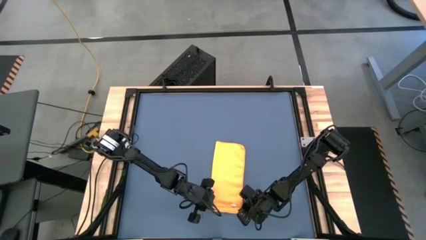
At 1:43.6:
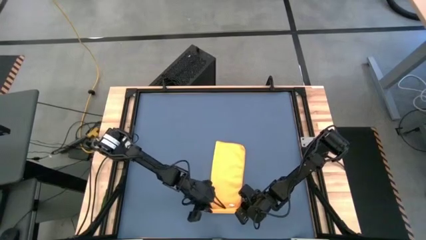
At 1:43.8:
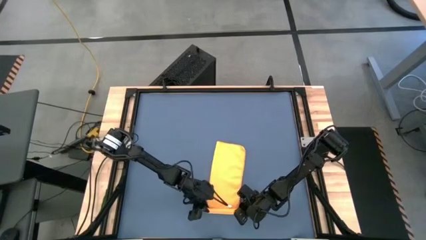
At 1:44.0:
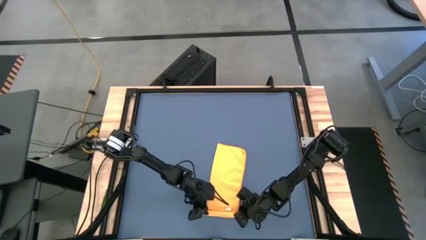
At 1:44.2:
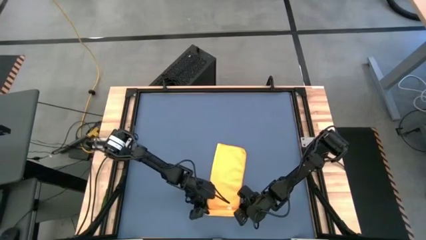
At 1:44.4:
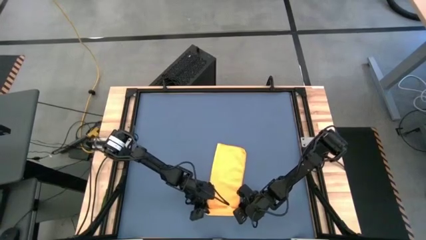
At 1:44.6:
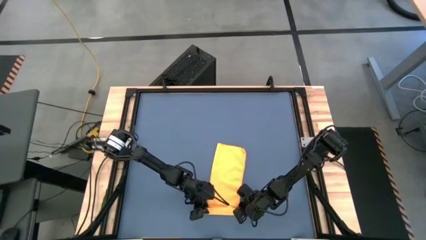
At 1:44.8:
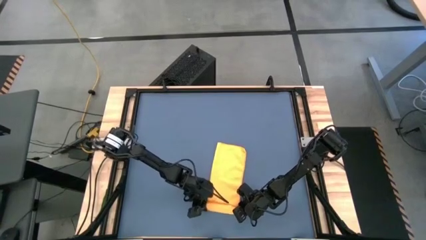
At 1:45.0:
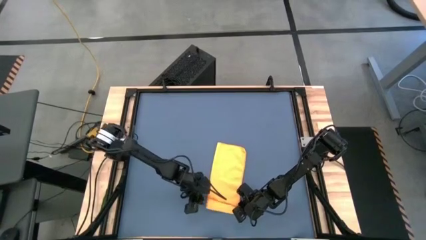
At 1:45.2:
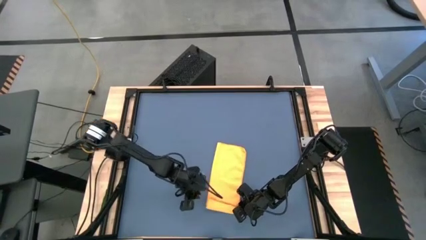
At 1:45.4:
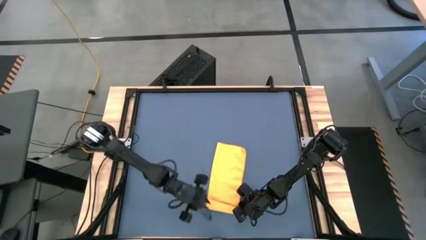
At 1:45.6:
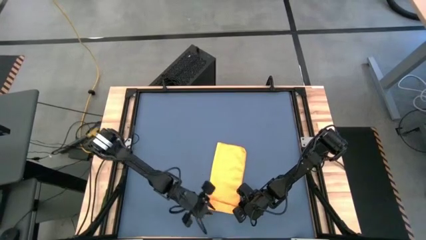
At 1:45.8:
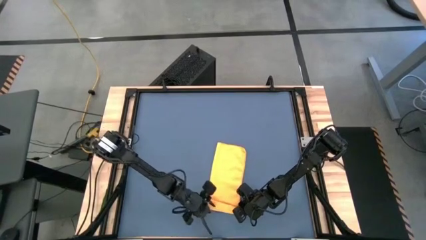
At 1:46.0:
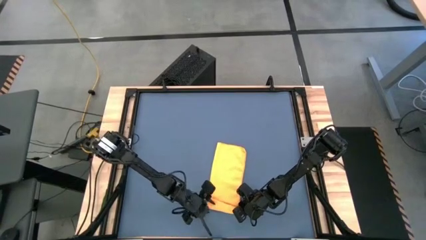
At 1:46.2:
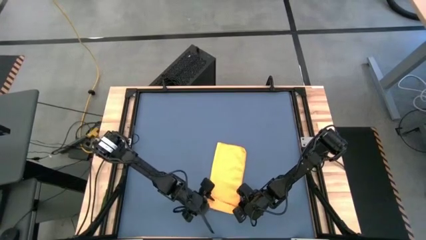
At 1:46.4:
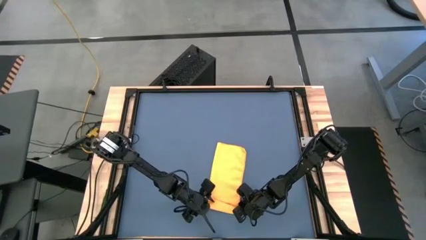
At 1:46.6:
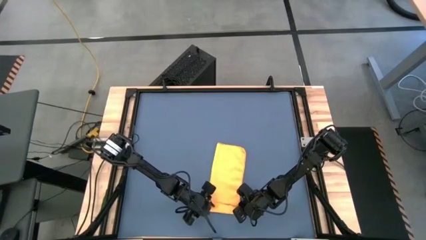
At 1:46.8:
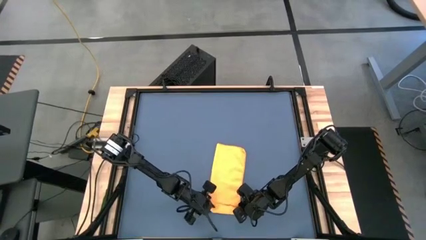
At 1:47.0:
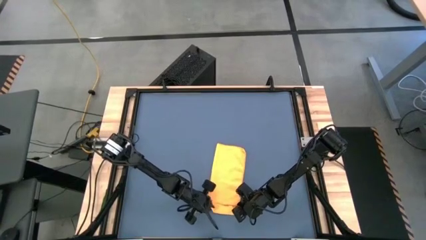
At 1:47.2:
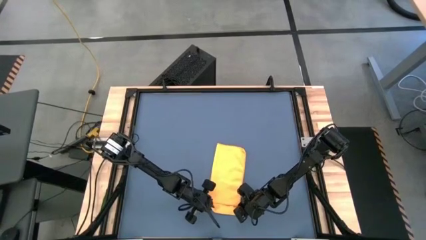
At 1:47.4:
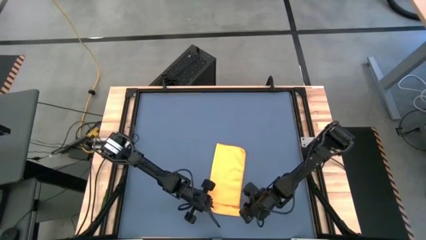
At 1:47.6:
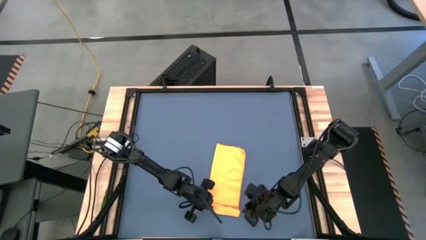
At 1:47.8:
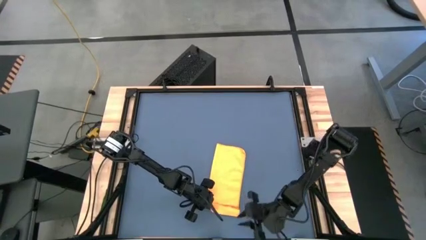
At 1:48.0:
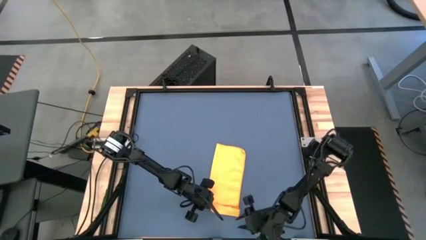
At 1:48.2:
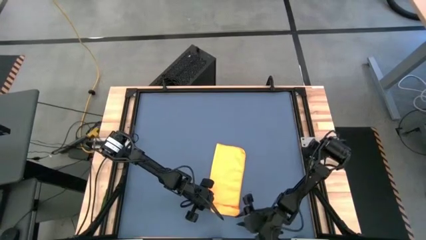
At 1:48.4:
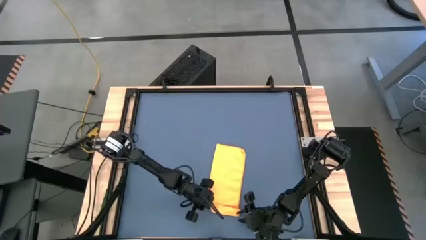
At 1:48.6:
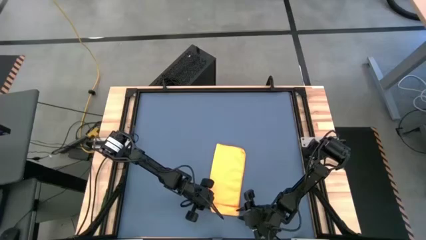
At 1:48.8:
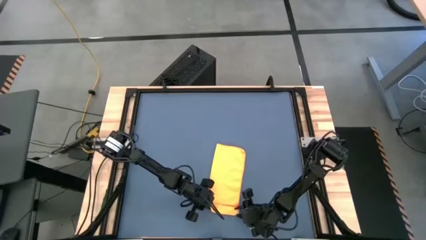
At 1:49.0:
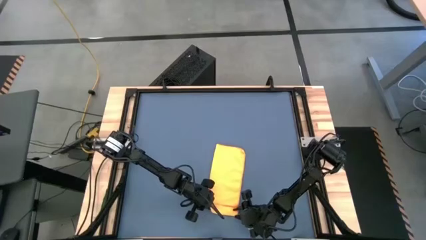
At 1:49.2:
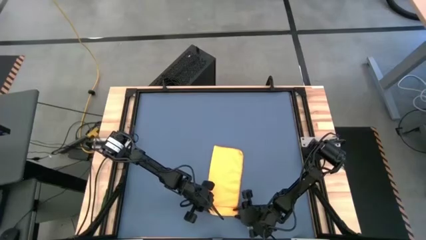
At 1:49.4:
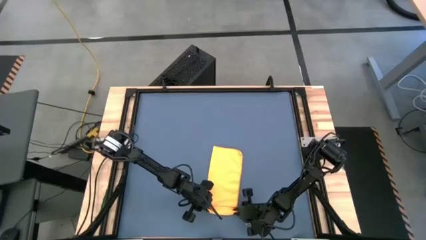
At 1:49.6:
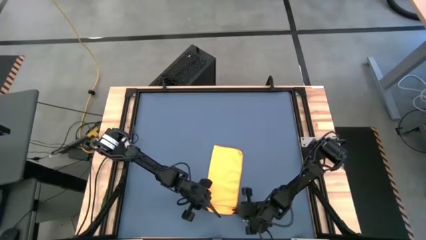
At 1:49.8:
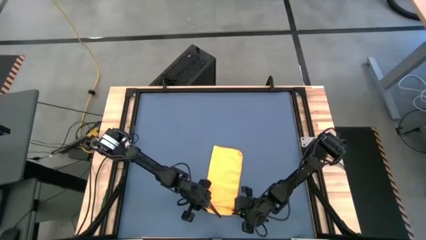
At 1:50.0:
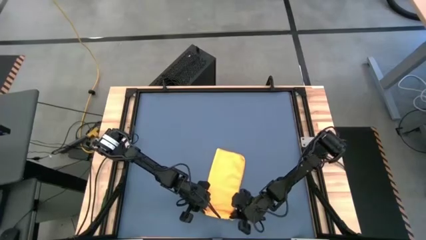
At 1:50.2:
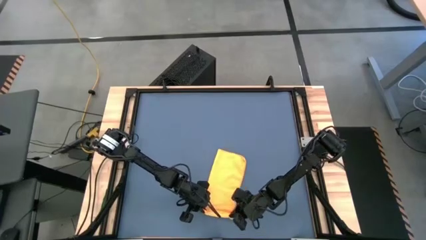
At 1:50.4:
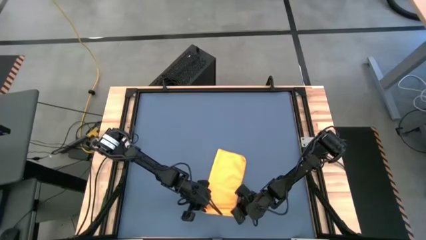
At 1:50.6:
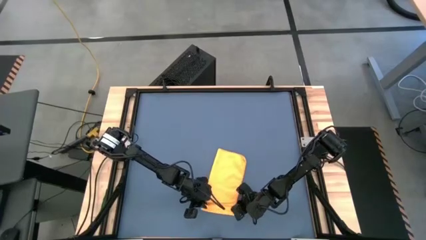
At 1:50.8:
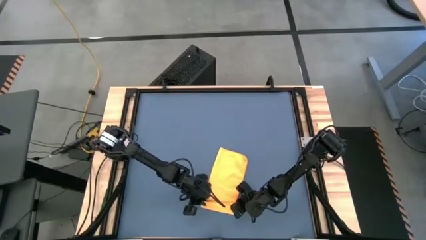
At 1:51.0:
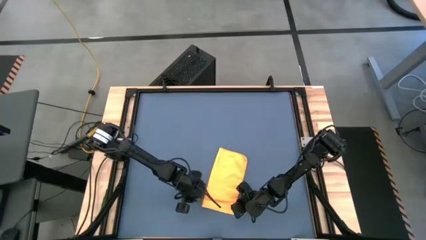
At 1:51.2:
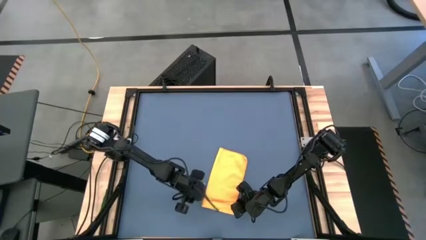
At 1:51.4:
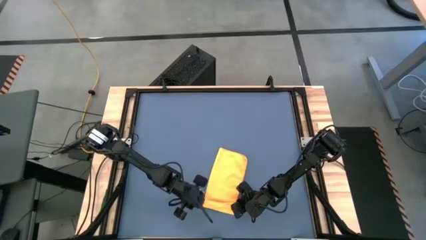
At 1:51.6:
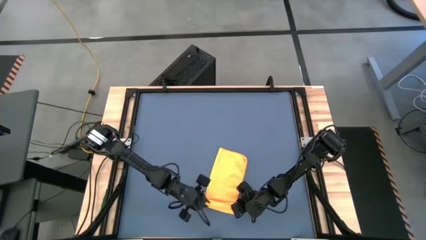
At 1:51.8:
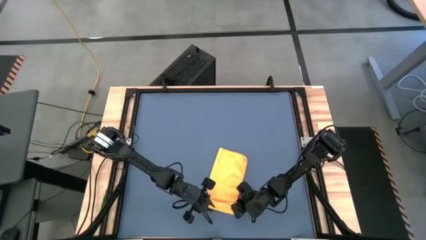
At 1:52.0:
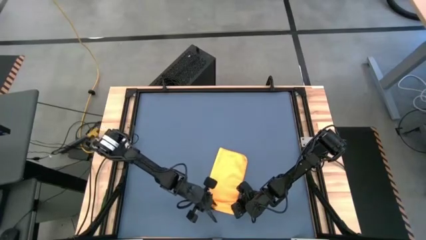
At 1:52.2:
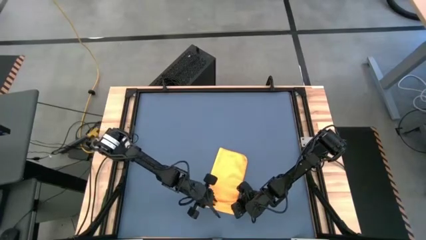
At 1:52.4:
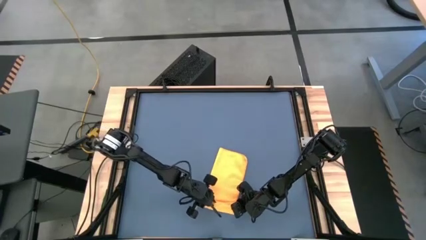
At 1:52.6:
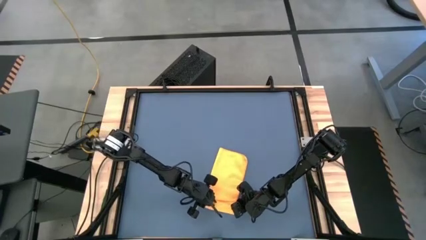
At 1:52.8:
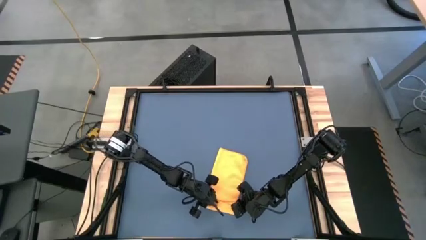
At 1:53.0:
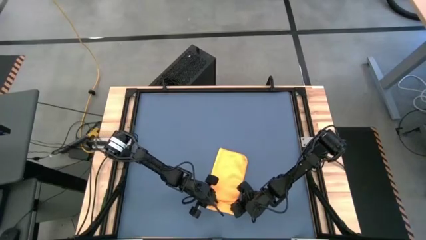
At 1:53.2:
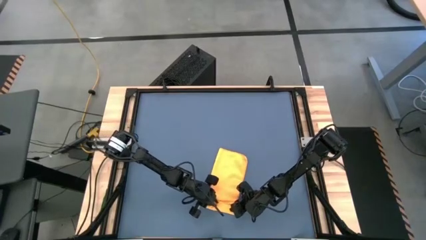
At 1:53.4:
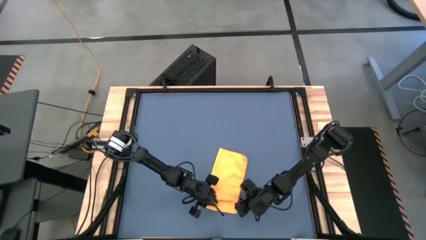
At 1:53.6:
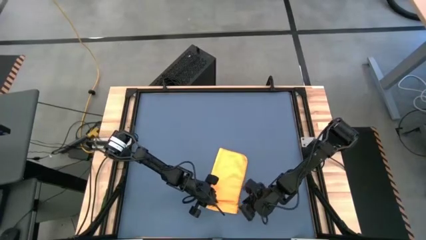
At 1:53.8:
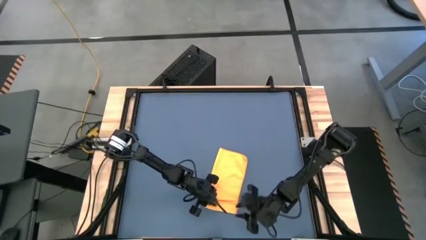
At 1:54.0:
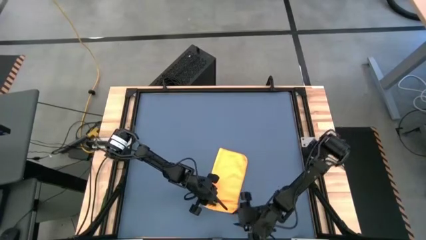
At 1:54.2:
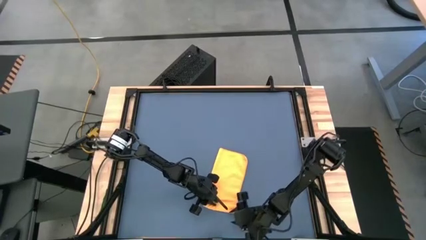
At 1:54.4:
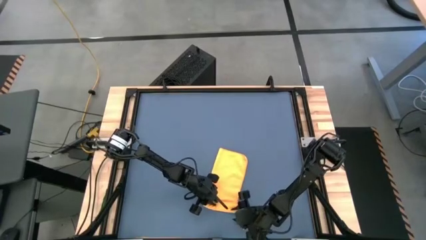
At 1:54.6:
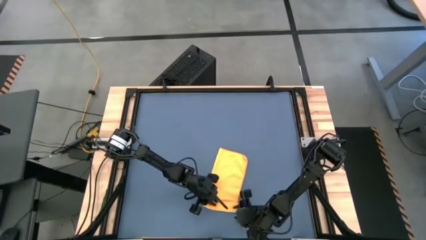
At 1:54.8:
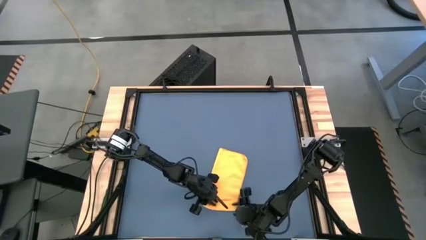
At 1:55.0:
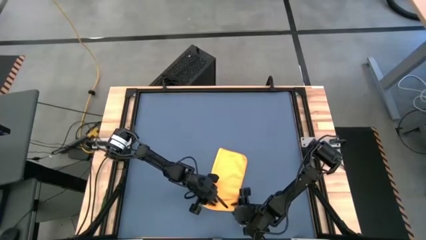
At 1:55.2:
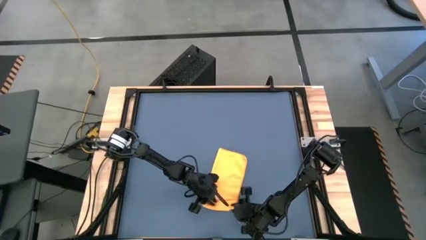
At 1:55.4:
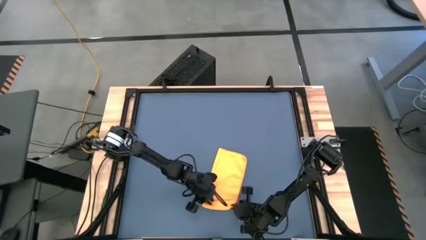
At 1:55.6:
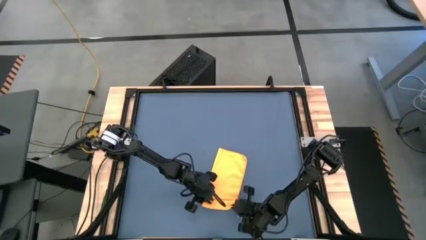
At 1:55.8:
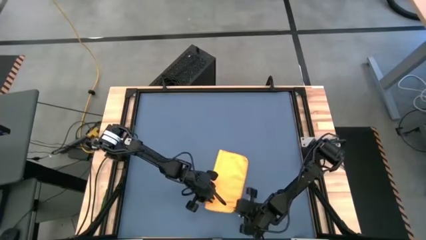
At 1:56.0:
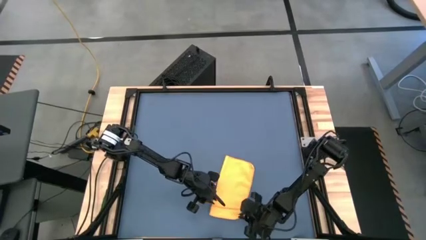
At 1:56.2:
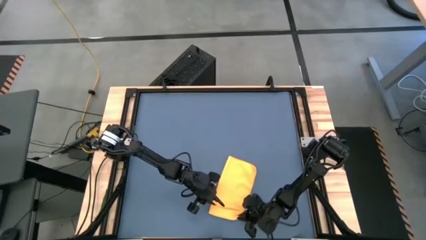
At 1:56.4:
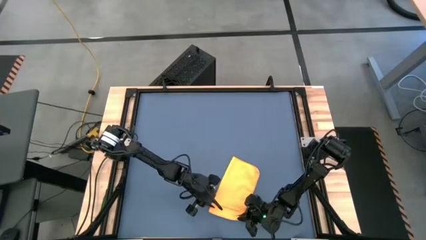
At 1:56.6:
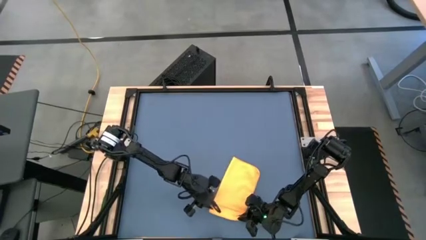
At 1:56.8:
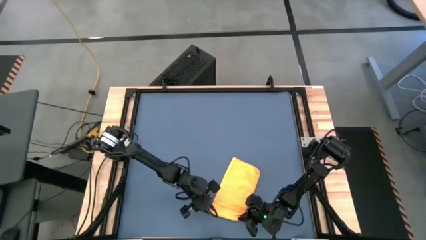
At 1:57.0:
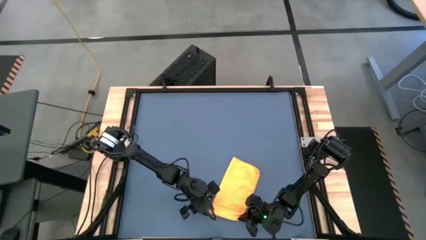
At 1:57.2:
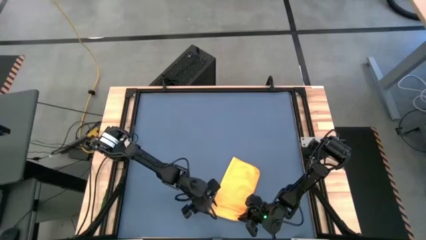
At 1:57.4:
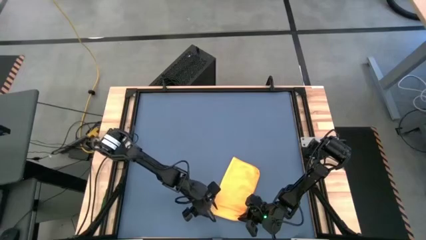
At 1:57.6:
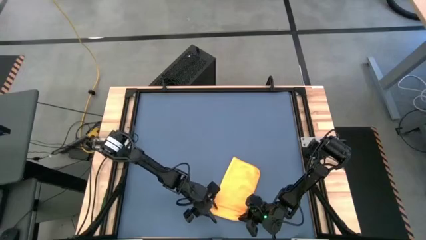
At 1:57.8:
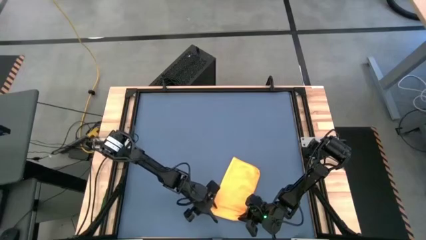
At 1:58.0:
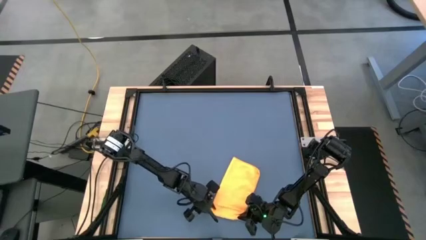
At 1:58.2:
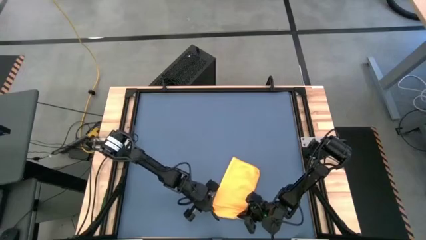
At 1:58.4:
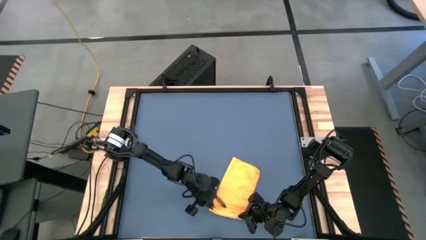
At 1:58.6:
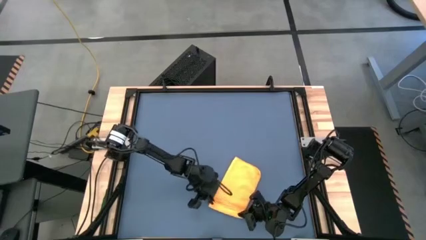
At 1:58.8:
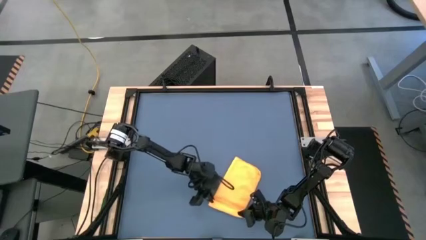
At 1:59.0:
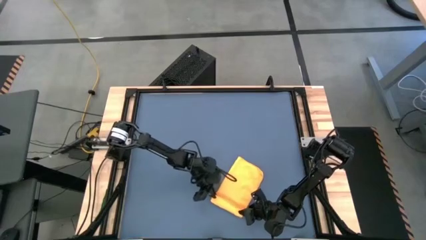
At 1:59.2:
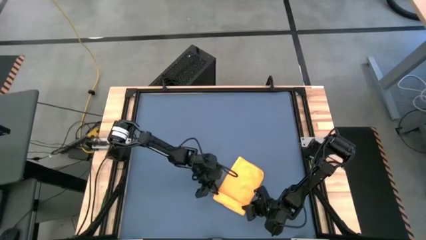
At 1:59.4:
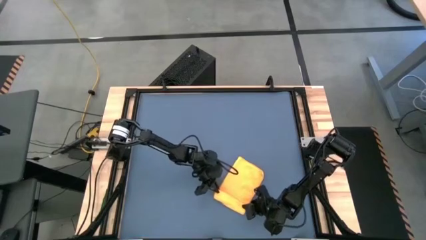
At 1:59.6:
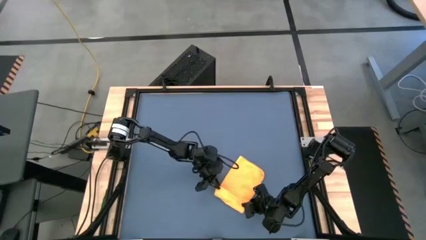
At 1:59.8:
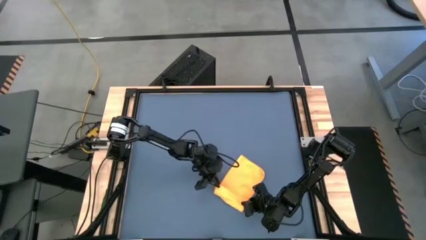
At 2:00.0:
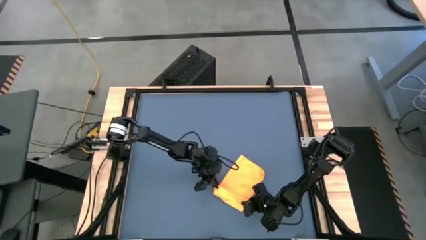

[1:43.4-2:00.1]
Task: Roll towel
Roll the orange microfiber towel
